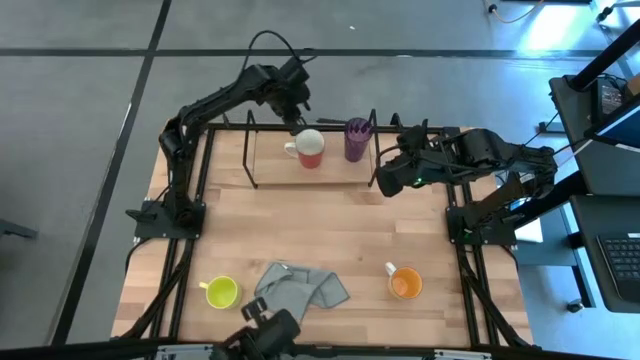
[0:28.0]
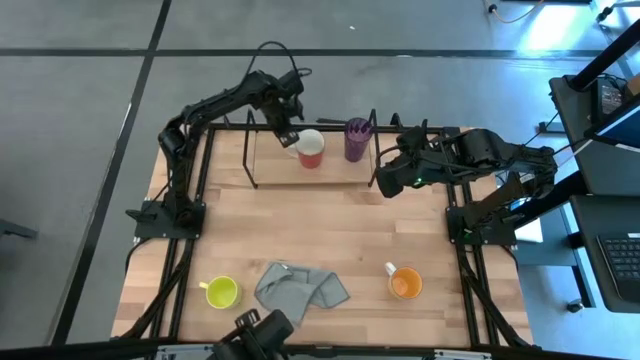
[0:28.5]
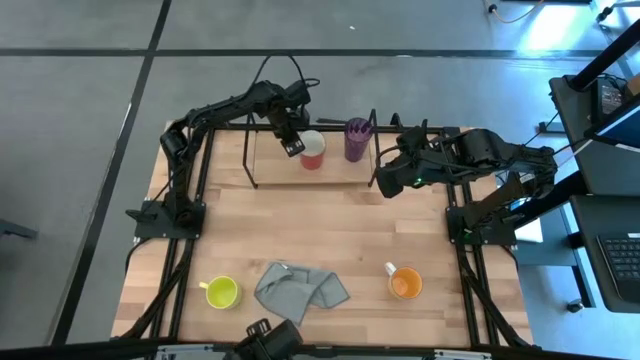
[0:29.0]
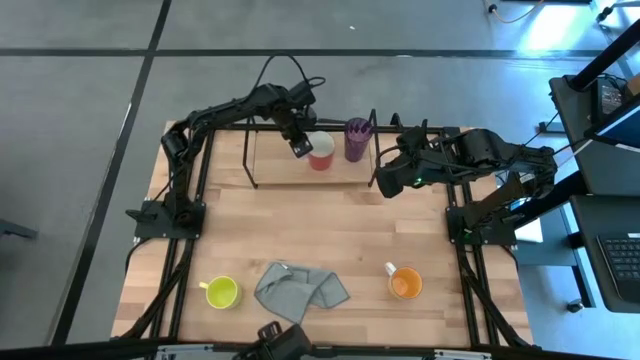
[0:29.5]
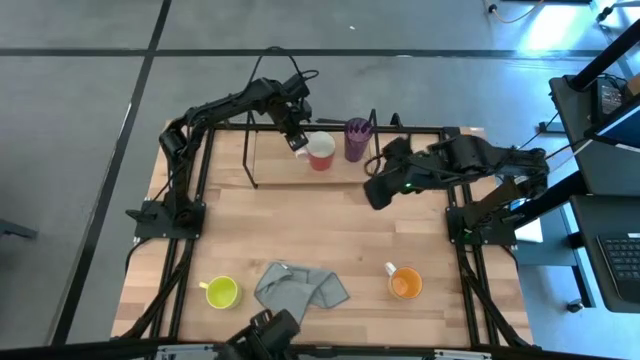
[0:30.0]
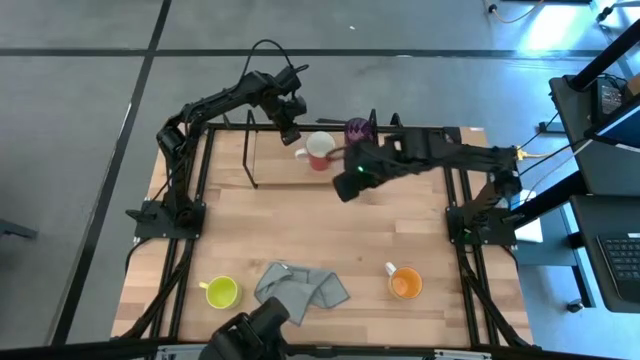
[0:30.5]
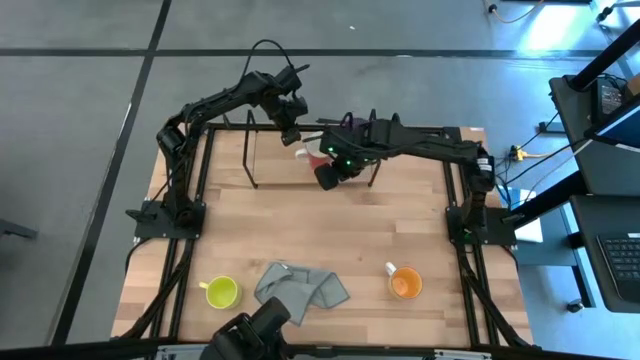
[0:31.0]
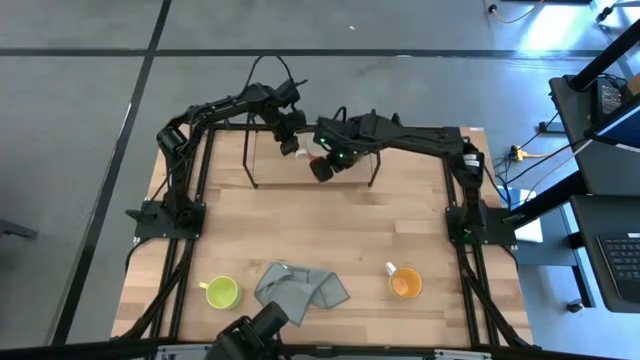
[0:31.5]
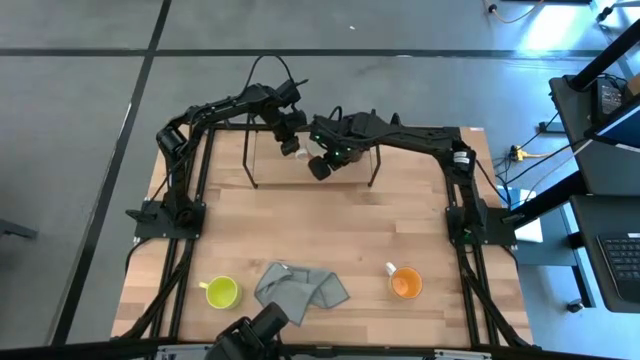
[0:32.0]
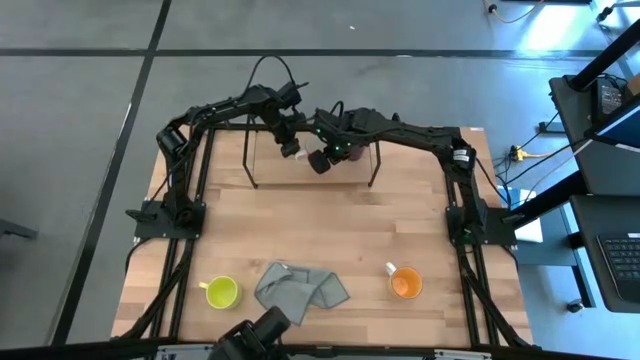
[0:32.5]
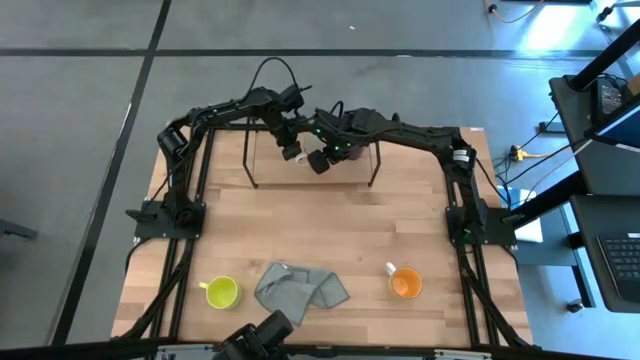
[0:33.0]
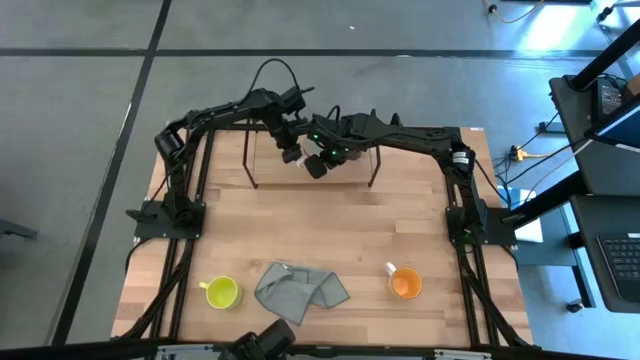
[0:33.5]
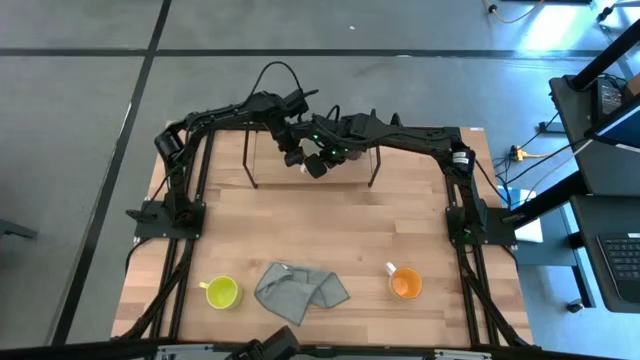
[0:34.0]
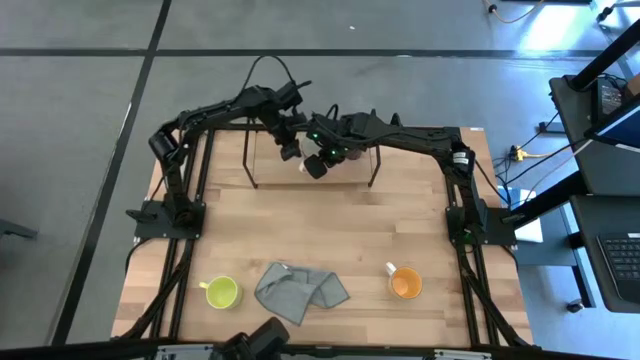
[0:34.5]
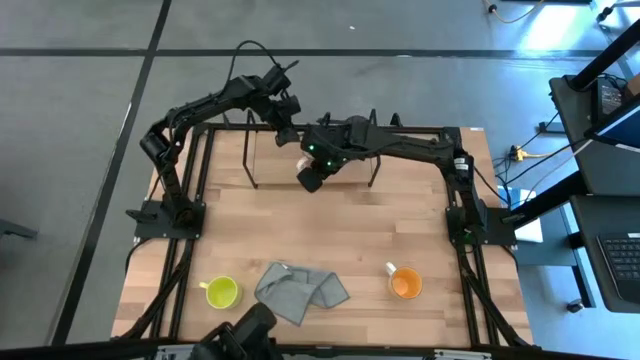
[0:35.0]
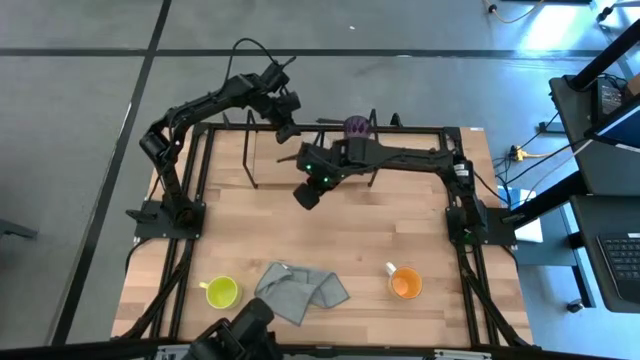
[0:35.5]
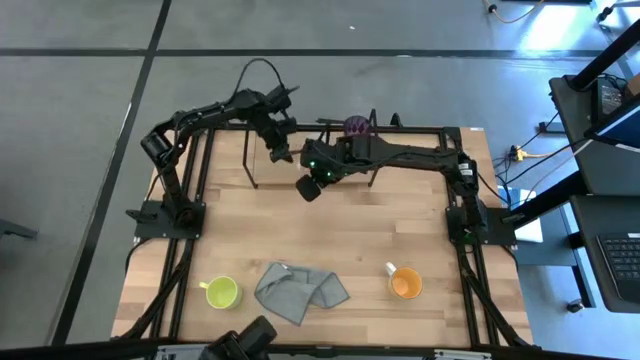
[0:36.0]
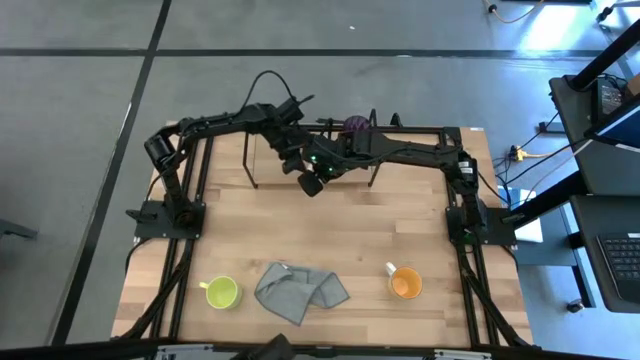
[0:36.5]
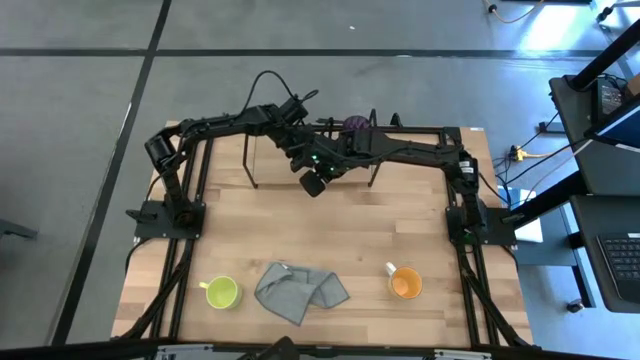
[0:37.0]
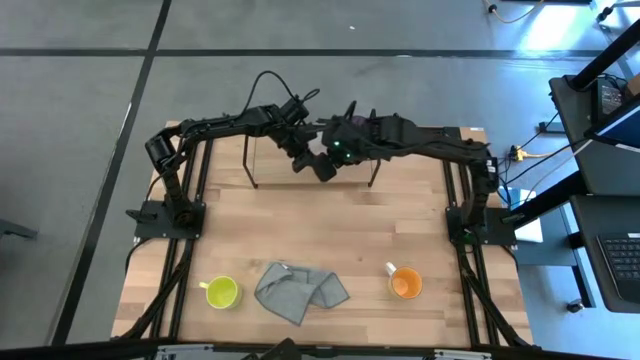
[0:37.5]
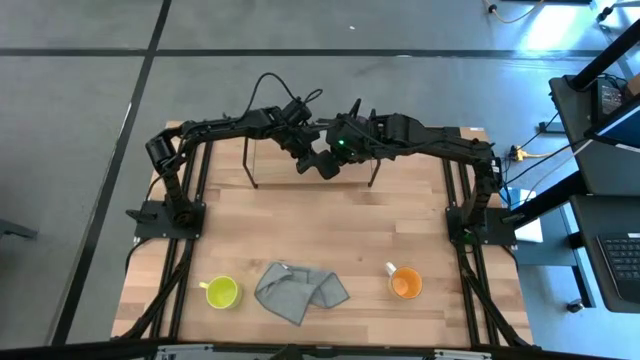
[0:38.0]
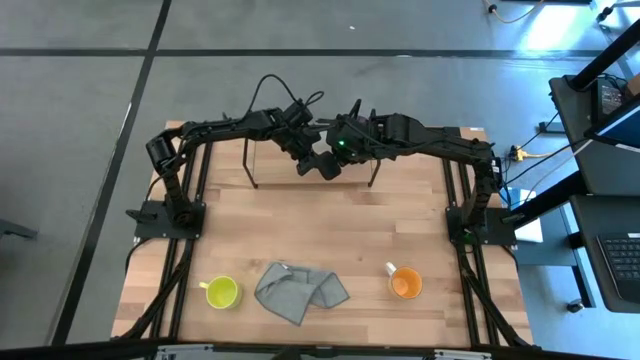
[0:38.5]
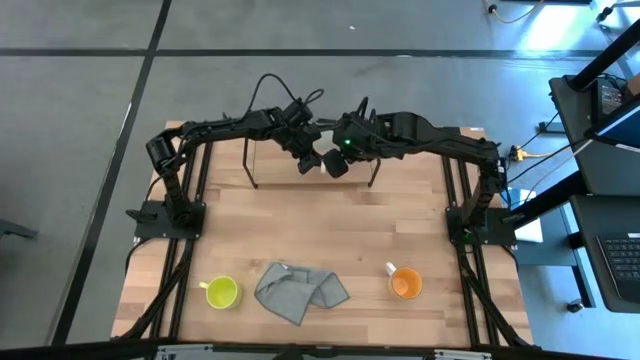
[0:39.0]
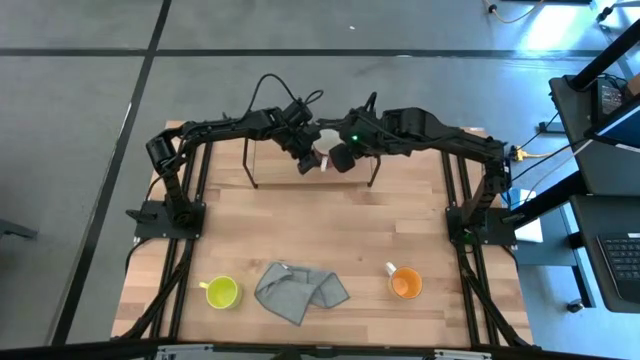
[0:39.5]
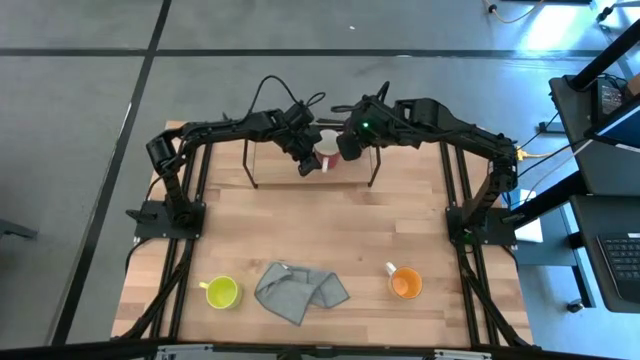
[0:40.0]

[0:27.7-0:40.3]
Task: Stack small to large cups/mugs on shelf
Put the orange mug on the shelf

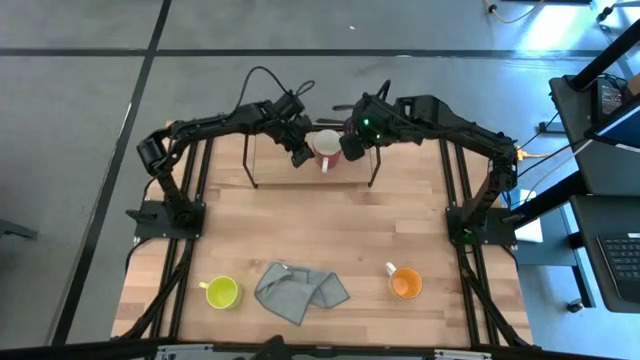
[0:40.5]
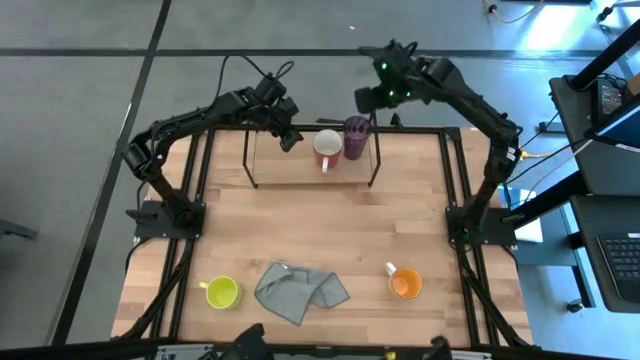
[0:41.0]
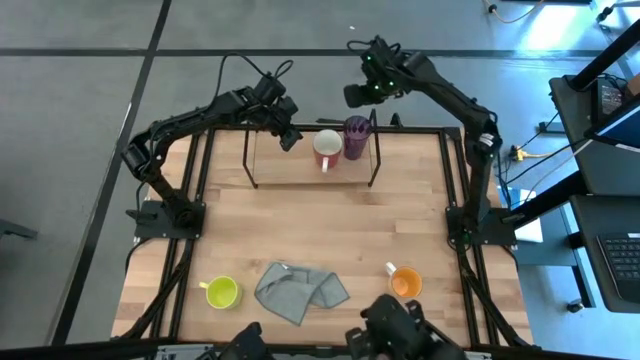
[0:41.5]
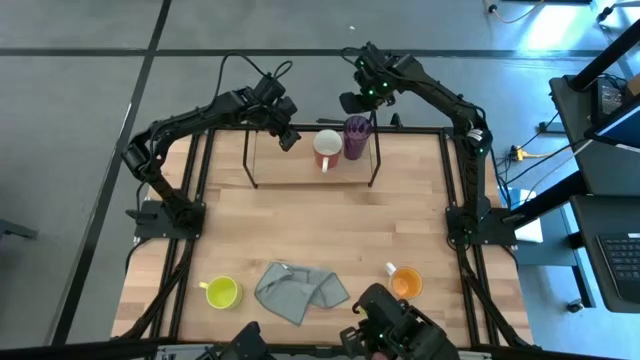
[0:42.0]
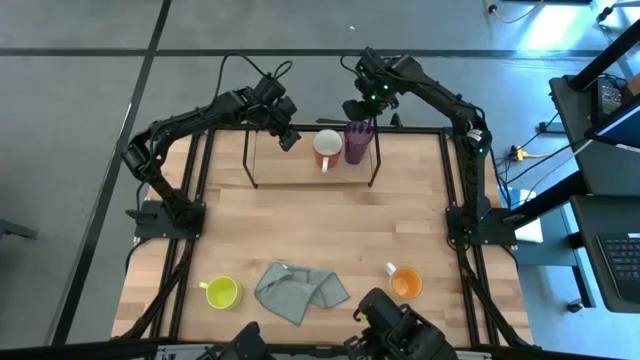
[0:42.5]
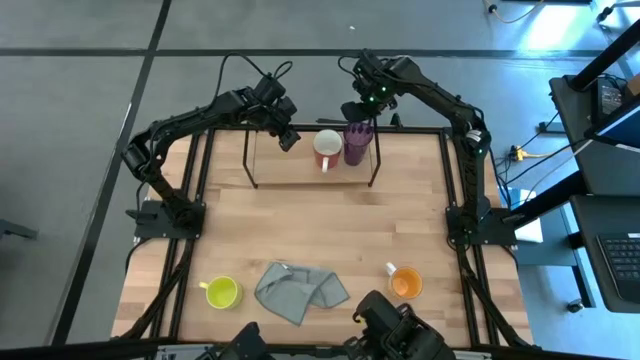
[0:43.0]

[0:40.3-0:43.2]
Adjust the violet cup on the shelf

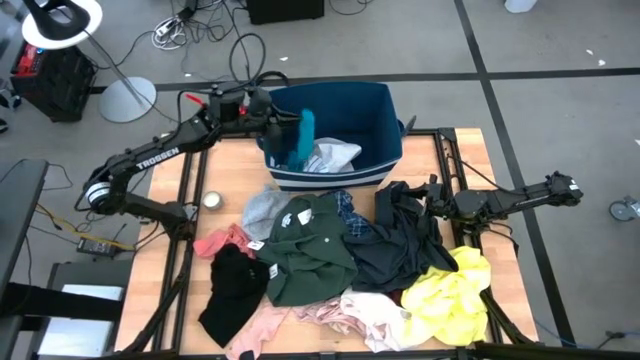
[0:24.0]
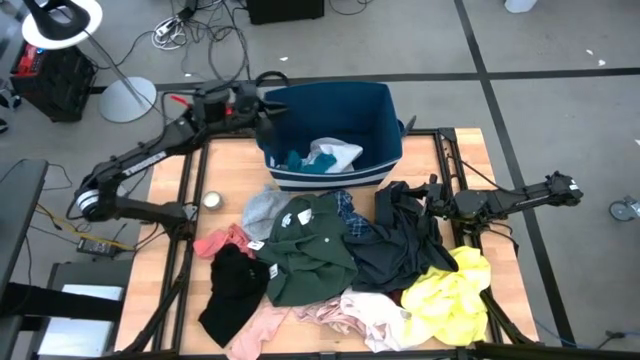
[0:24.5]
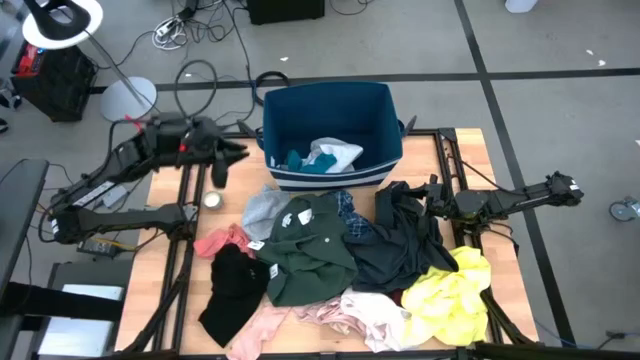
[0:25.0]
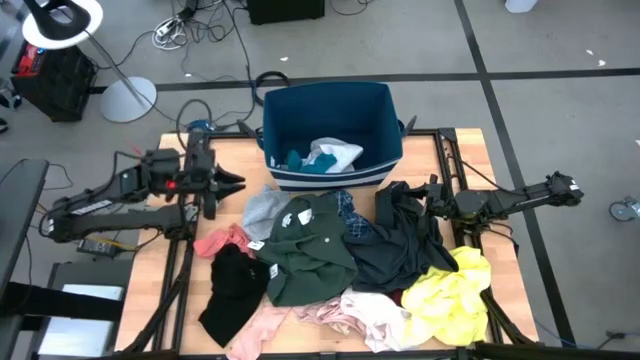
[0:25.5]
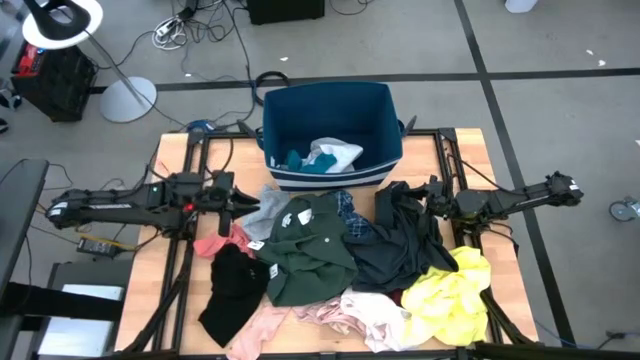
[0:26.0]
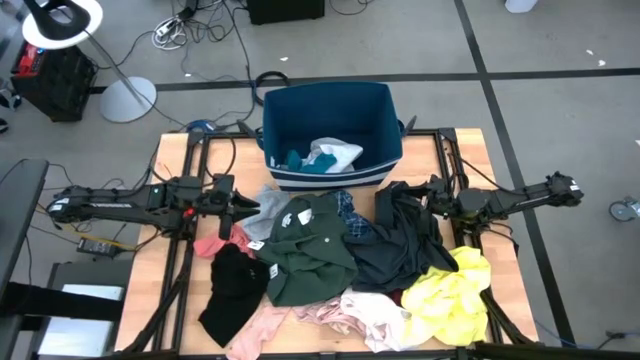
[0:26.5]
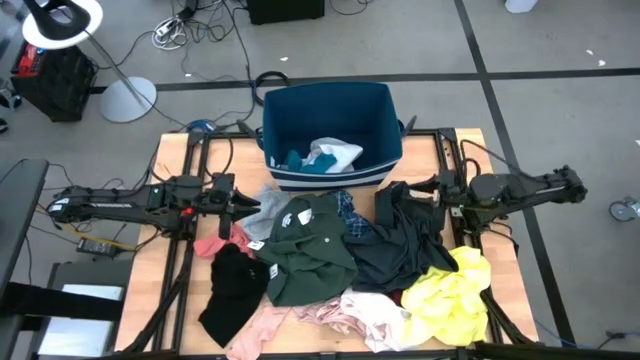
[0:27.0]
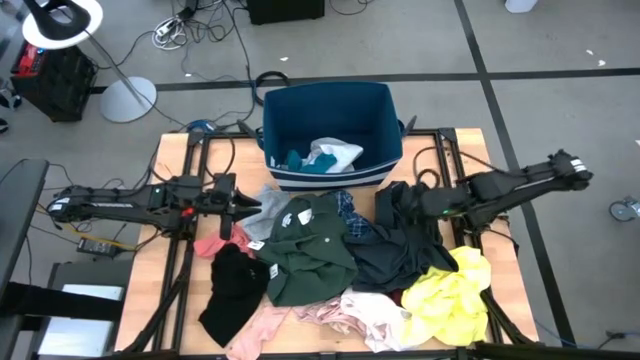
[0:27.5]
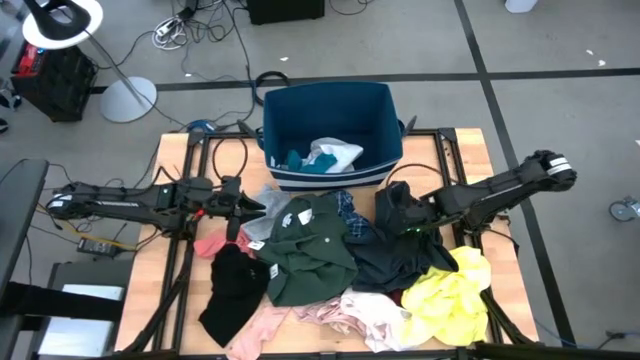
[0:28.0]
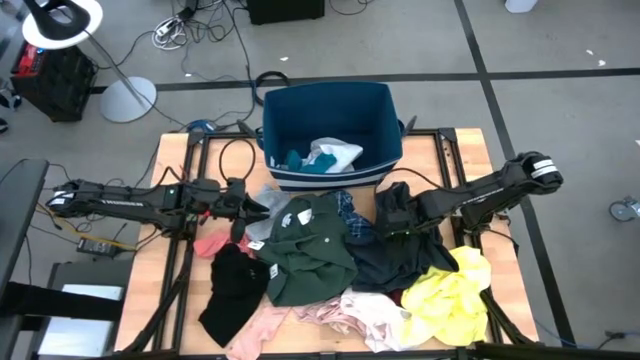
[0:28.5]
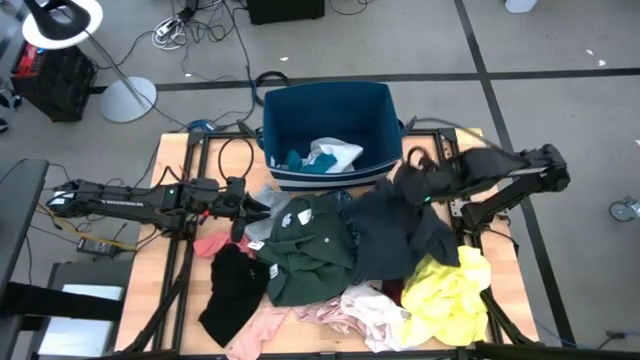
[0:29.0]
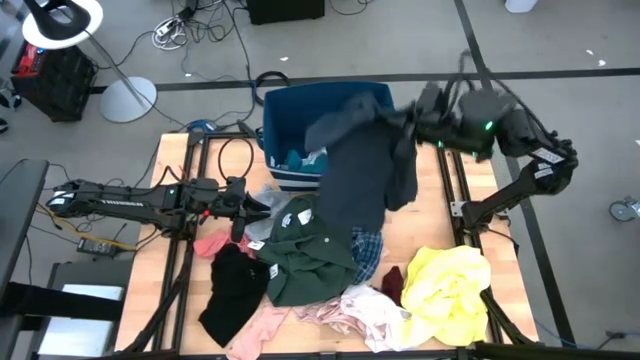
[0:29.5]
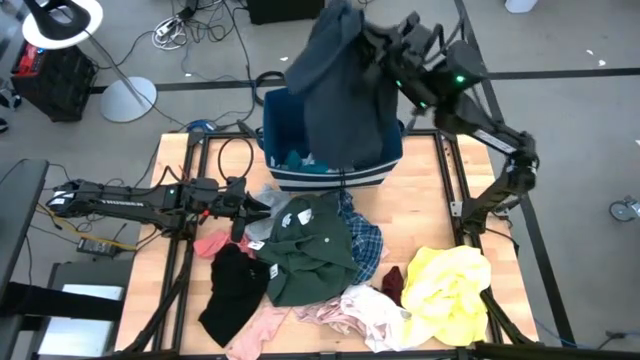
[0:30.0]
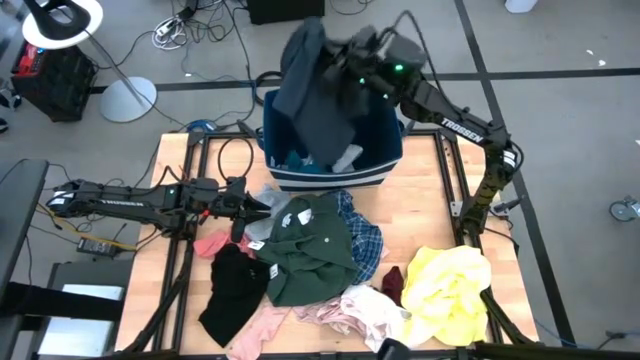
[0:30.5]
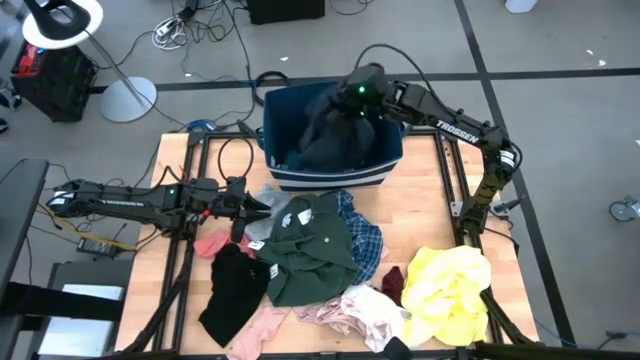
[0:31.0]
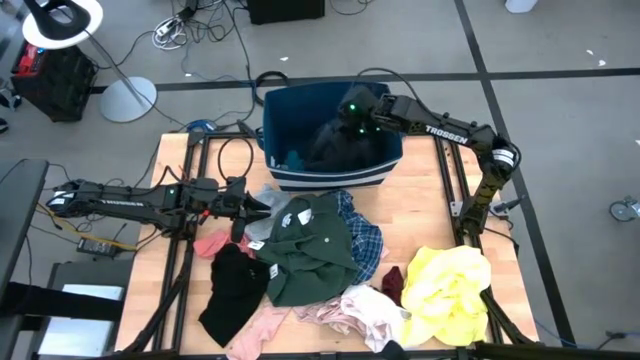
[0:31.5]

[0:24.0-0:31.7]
Task: Sort clothes
Put the black jacket into the blue laundry bin
